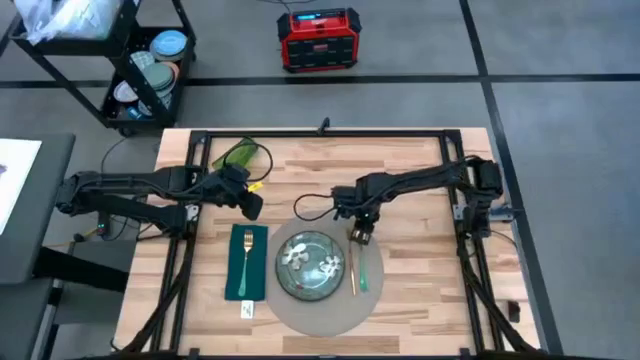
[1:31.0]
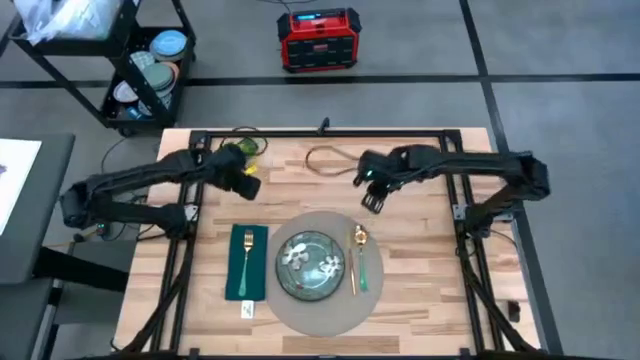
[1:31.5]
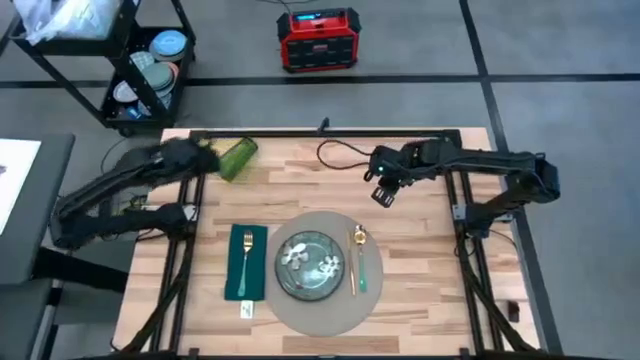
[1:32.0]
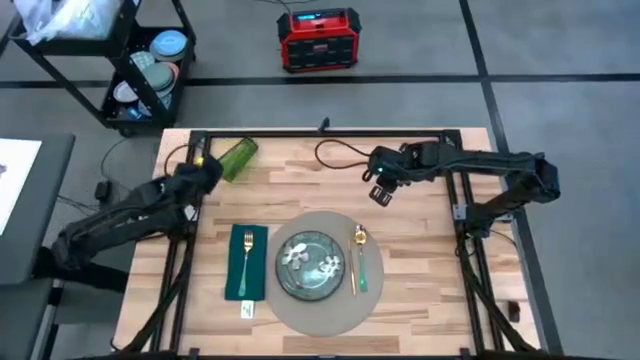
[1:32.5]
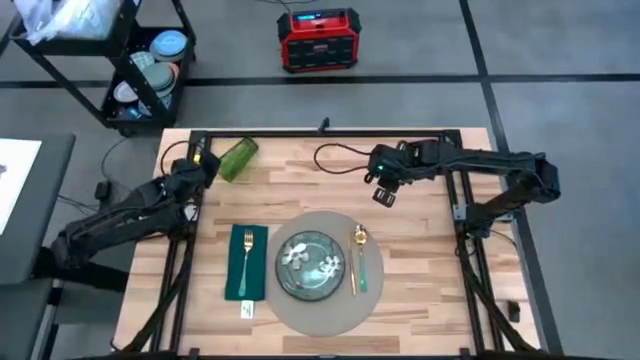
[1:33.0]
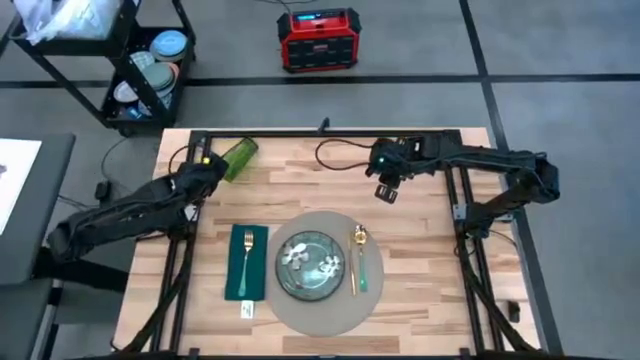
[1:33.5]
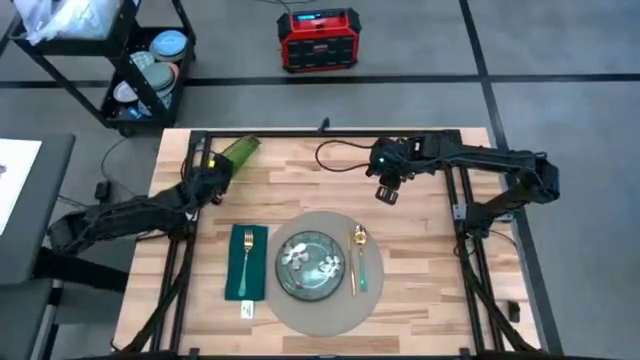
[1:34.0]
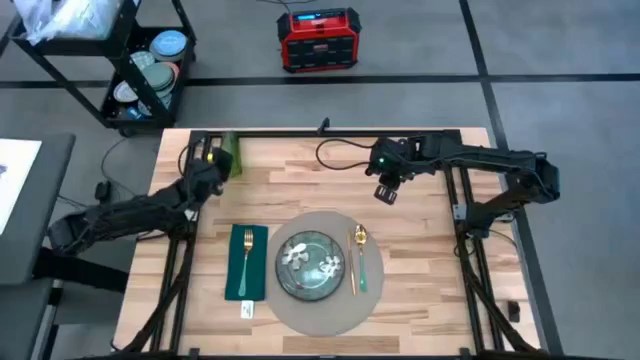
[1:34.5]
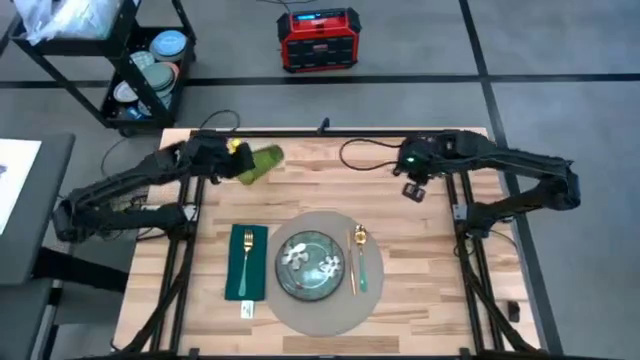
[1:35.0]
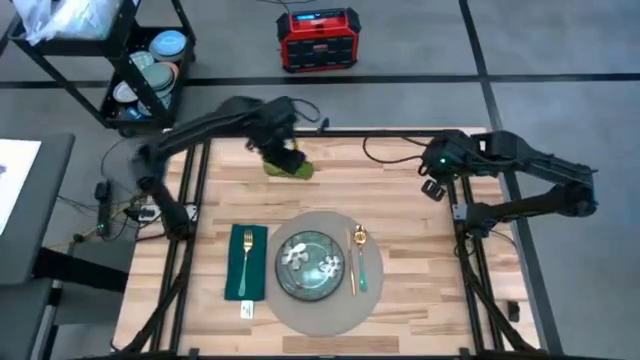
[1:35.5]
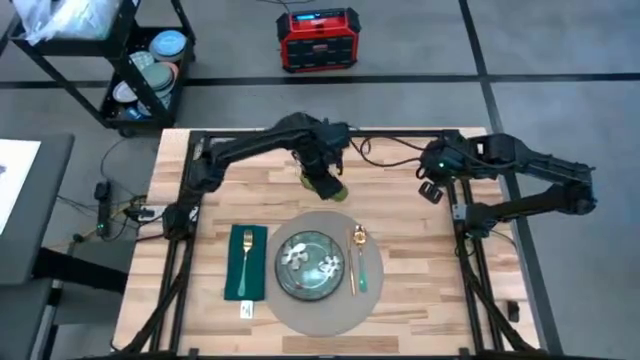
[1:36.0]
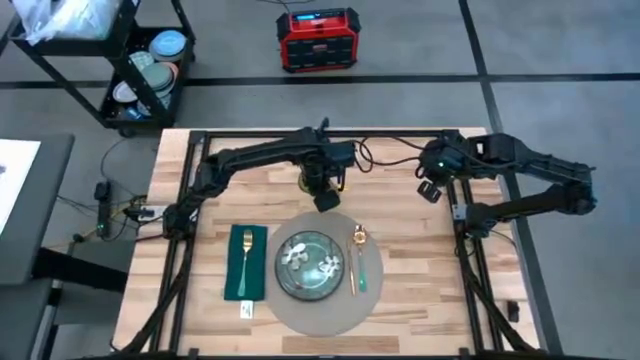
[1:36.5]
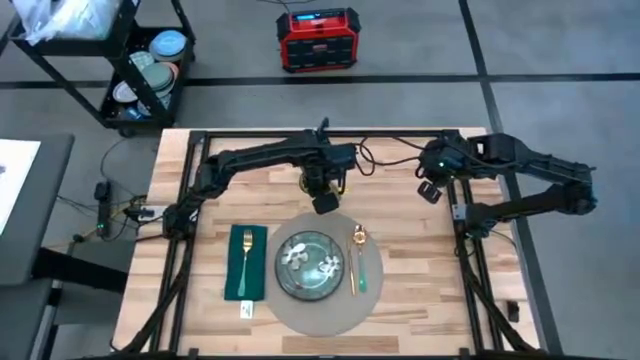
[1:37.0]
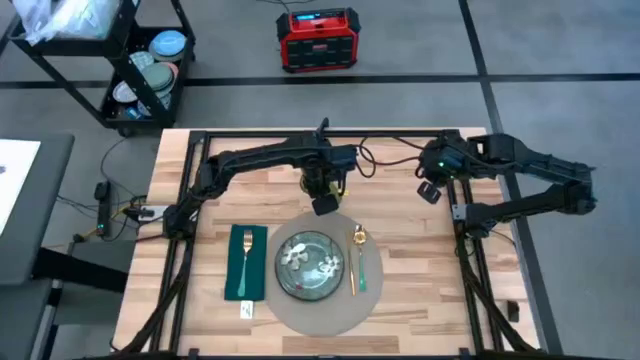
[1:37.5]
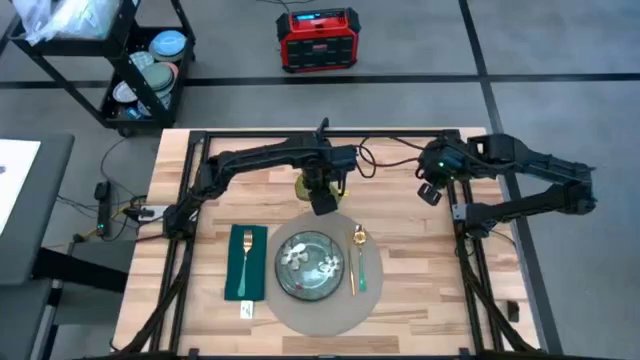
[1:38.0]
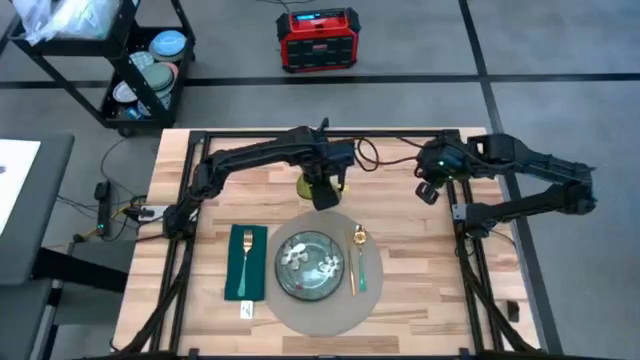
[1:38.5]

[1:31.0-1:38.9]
Task: Set table place
Put the green cup to the top right of the gray tablemat

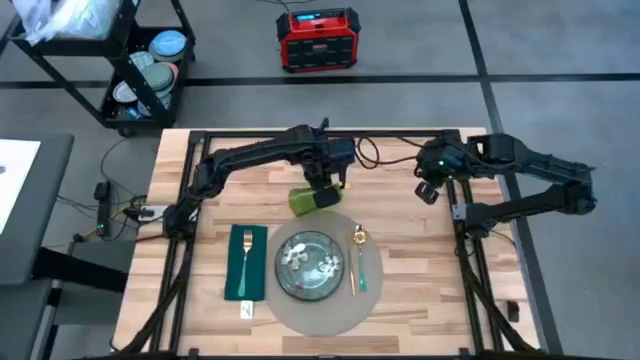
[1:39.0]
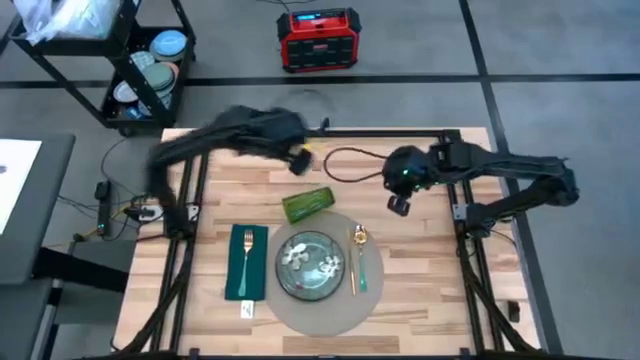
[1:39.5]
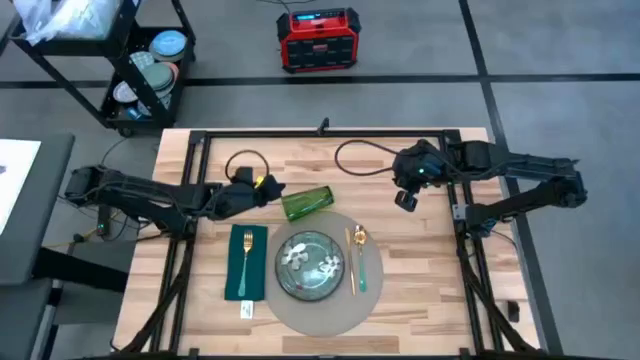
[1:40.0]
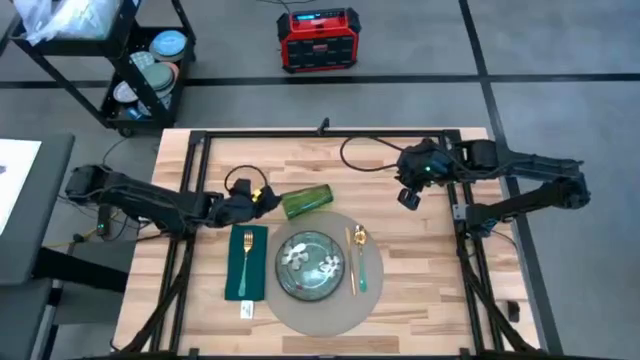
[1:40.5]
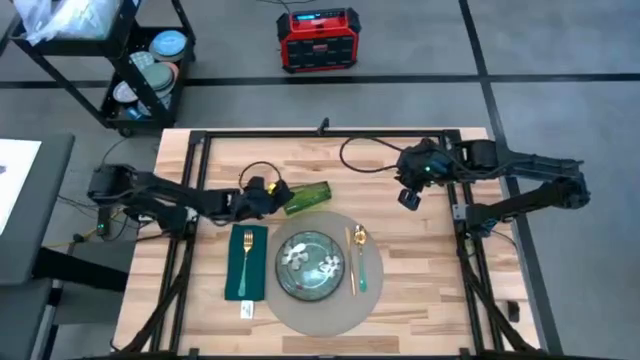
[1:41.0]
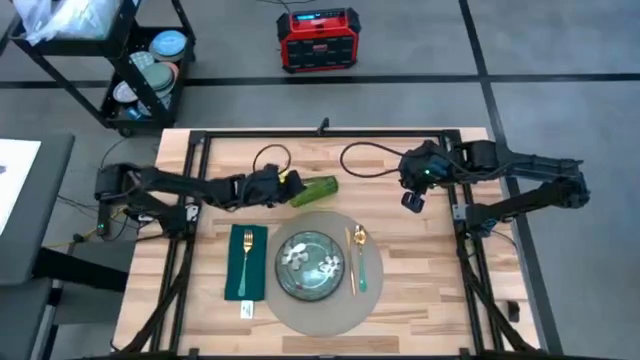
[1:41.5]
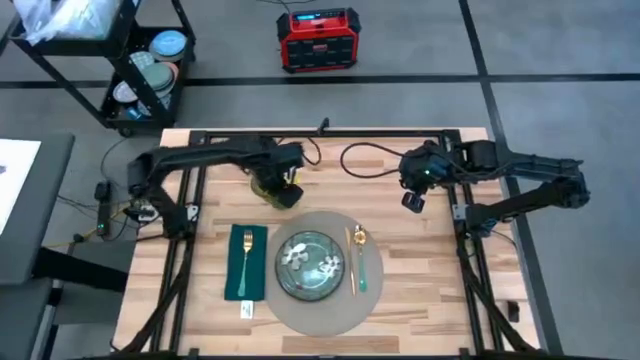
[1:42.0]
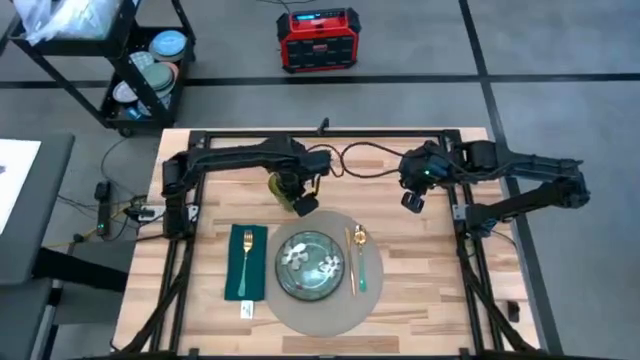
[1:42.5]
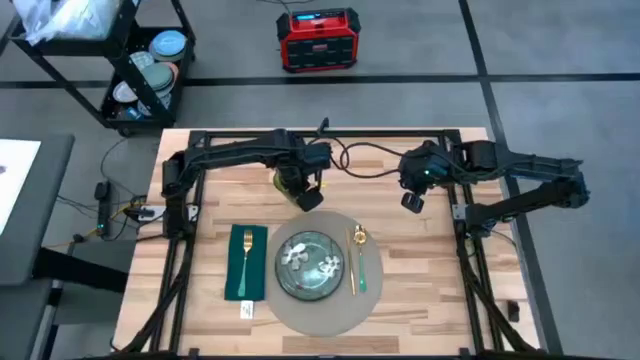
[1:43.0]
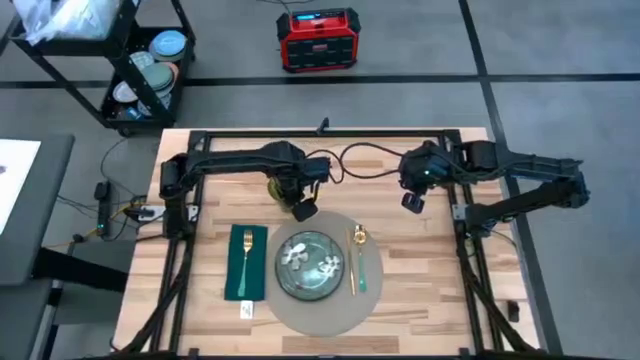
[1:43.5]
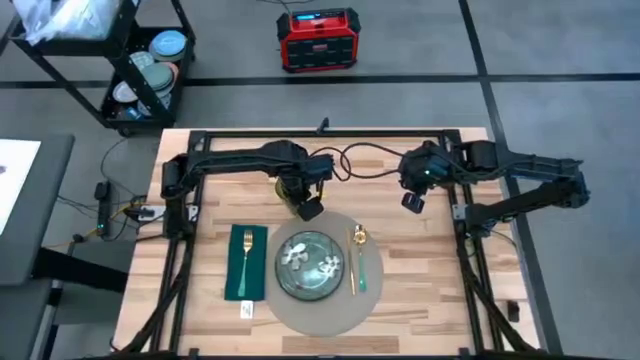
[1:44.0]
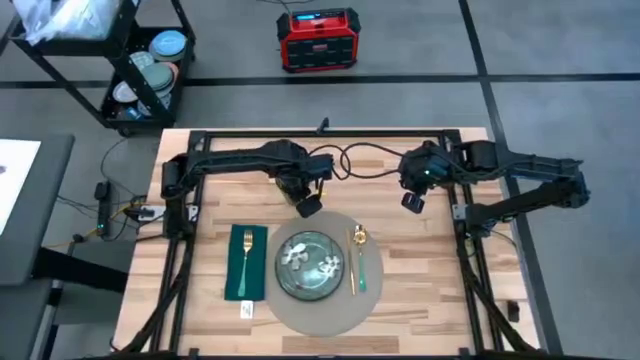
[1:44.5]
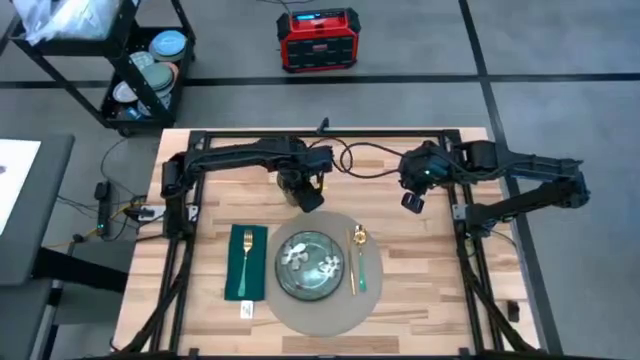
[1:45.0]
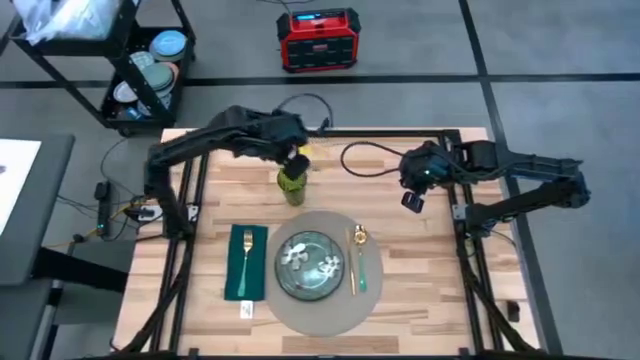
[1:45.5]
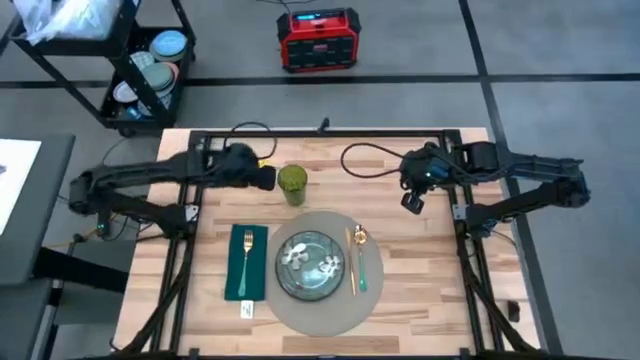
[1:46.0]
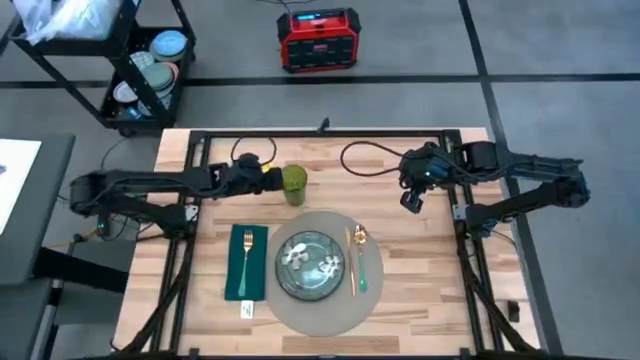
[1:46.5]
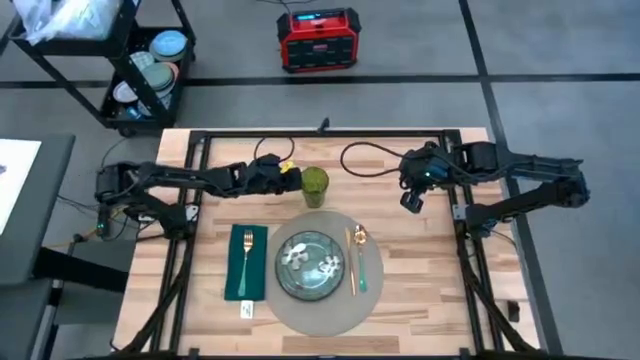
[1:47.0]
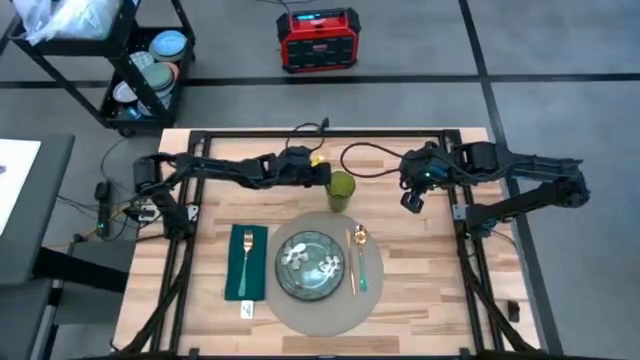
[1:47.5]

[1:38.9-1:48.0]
Put the green cup to the top right of the gray tablemat

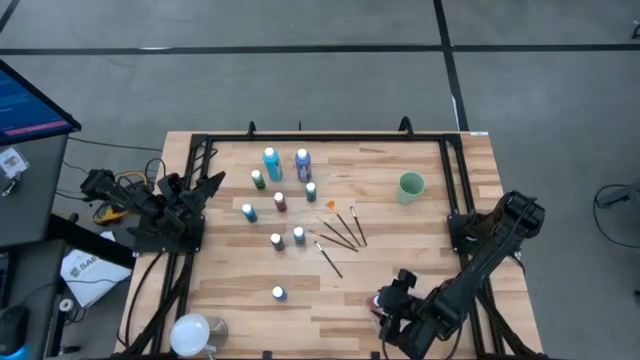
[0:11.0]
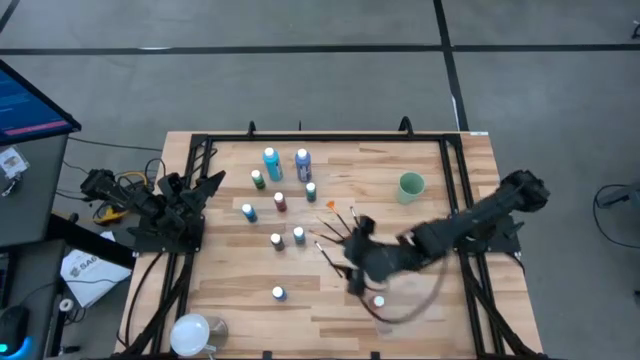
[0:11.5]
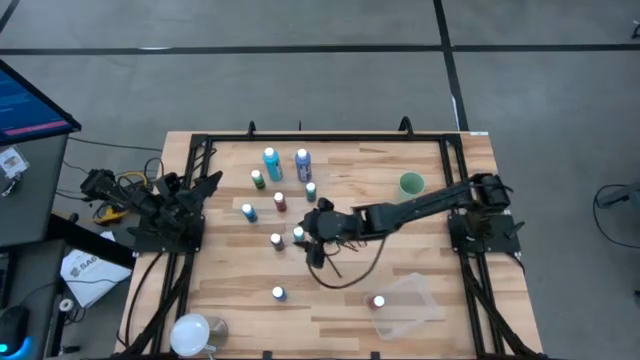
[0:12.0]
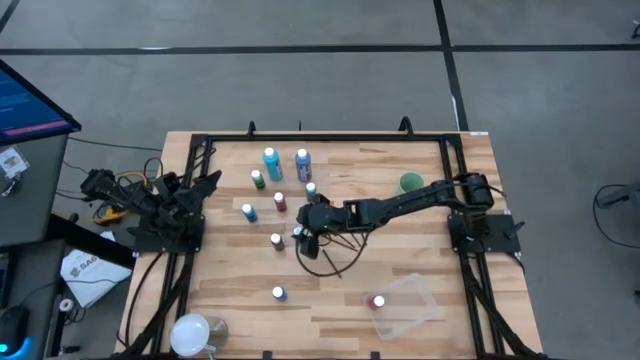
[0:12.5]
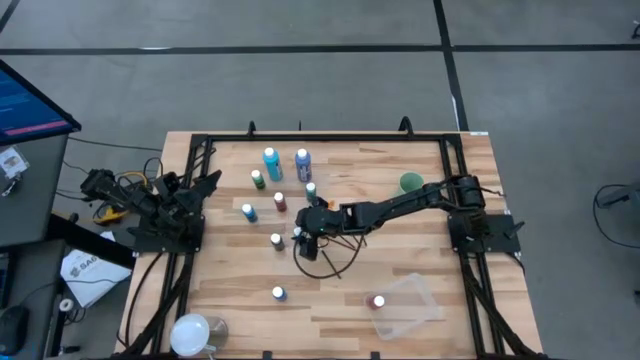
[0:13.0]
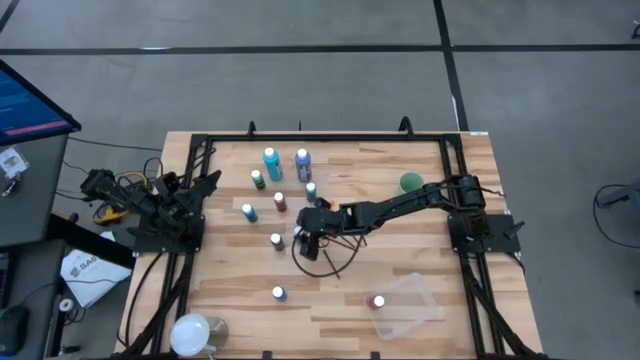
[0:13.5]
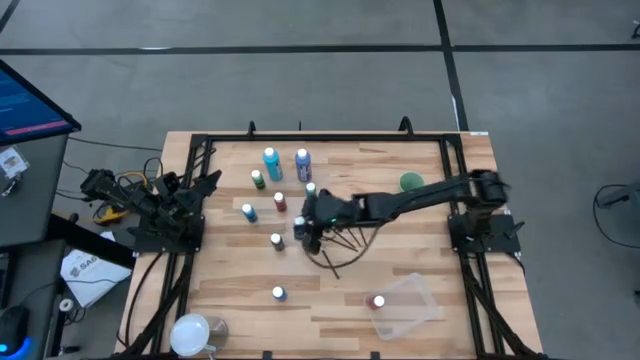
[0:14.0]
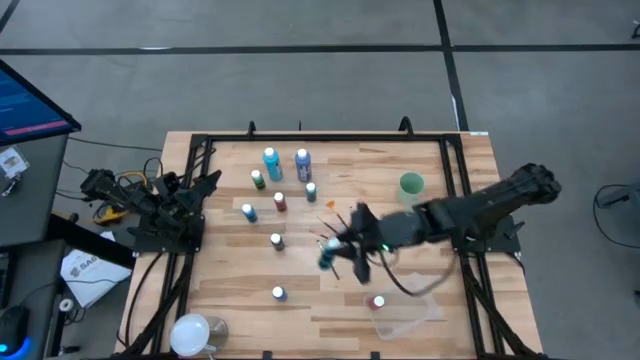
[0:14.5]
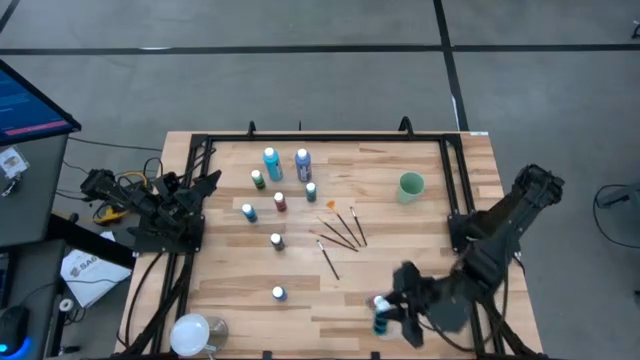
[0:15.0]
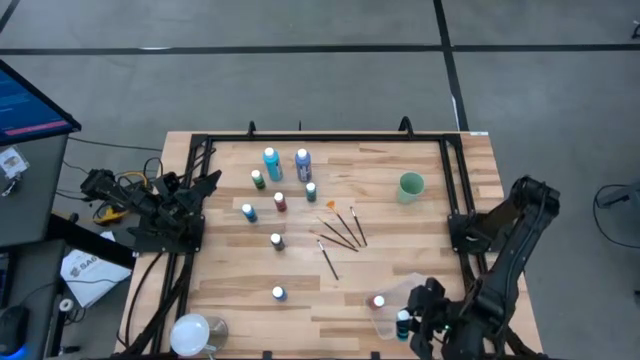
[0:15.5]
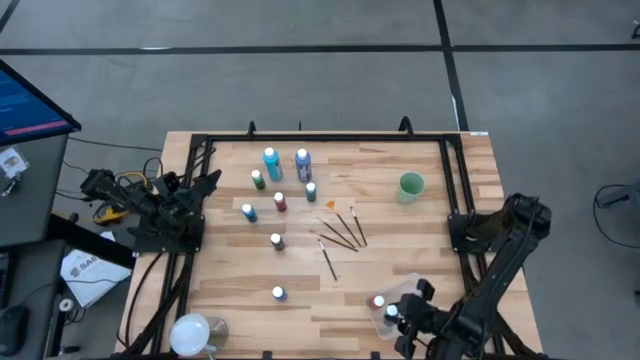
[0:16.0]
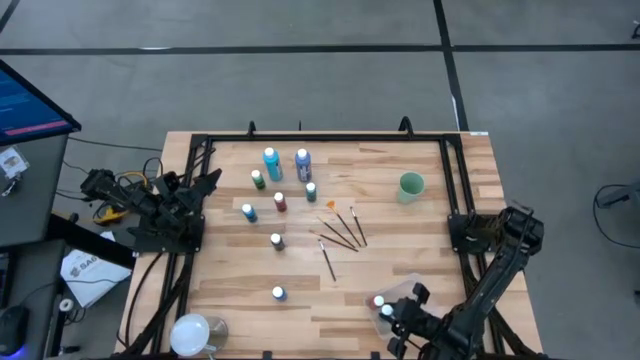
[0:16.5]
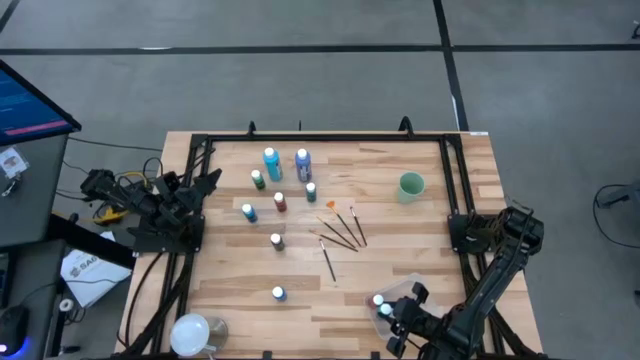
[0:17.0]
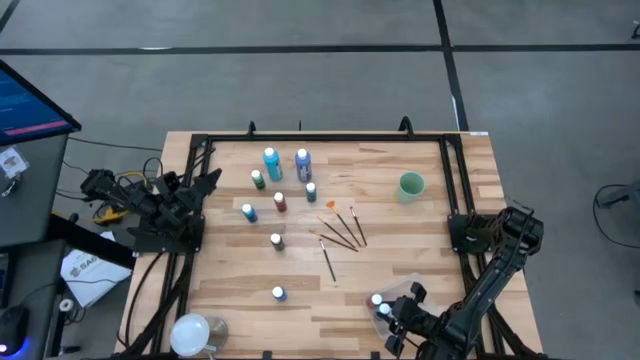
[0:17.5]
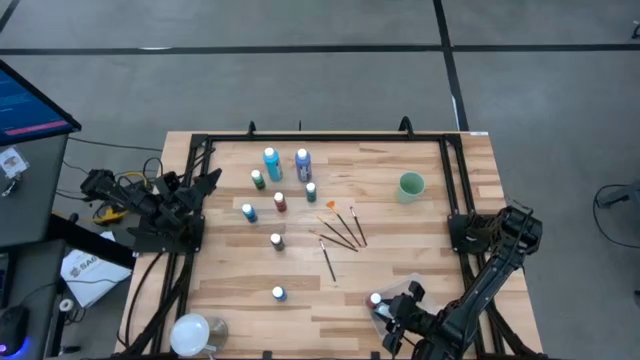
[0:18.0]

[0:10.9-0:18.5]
Task: Pick & Place Paint Supplies
Put the light blue paint bottle into the transparent bin
